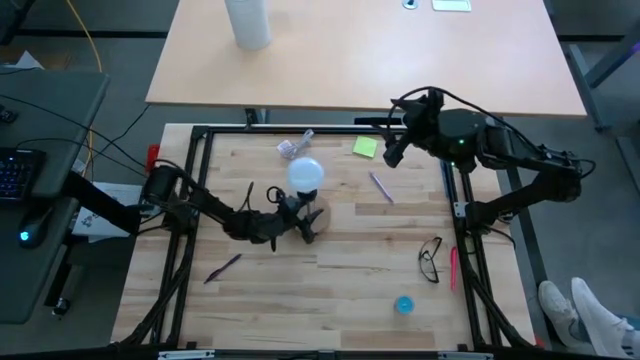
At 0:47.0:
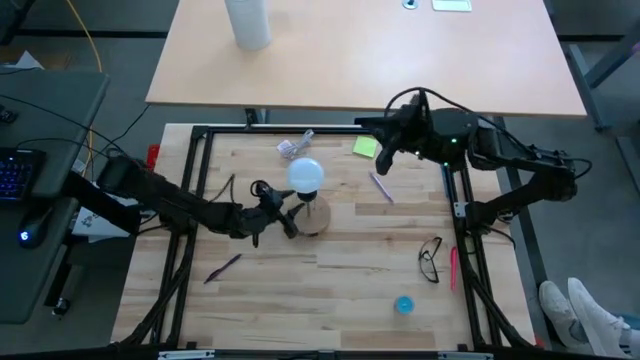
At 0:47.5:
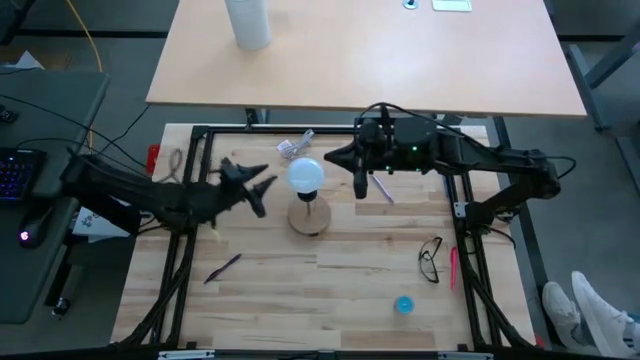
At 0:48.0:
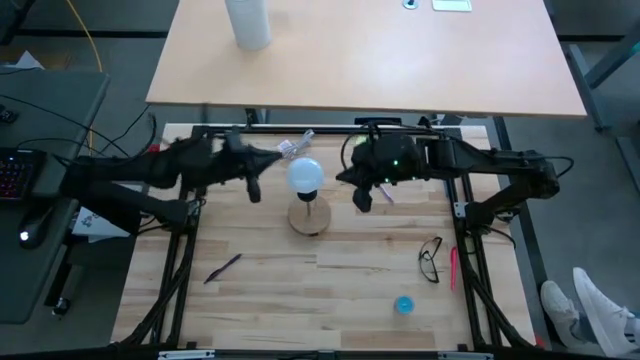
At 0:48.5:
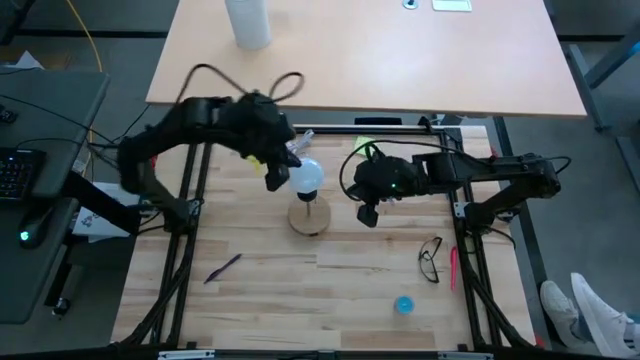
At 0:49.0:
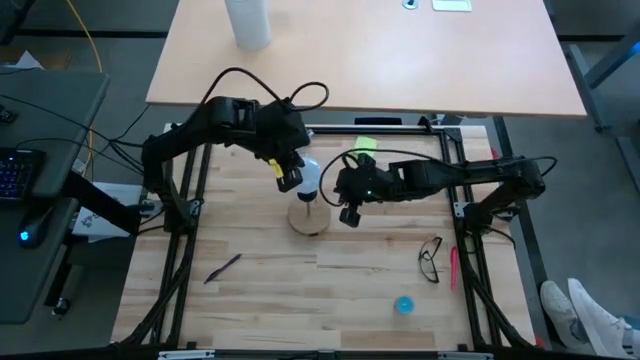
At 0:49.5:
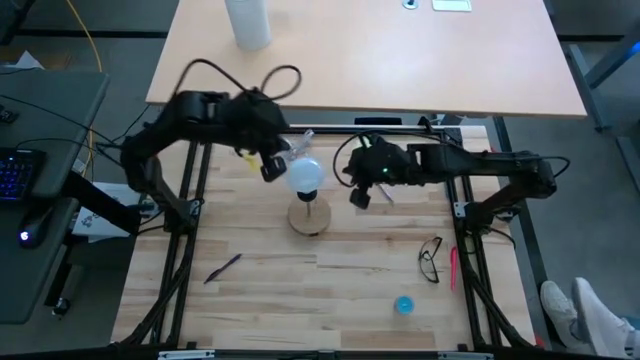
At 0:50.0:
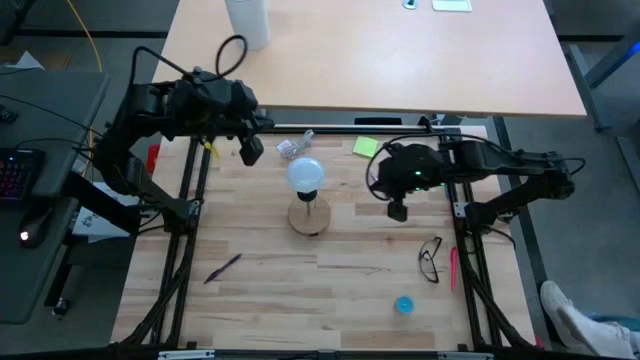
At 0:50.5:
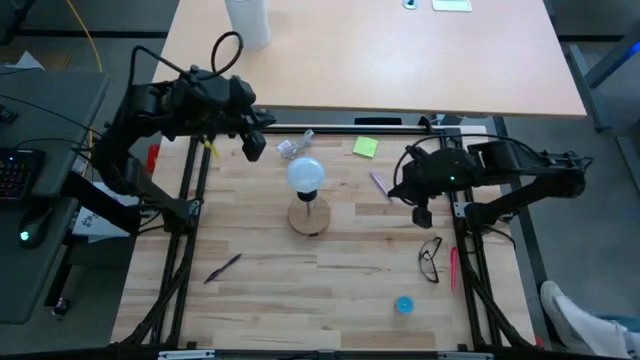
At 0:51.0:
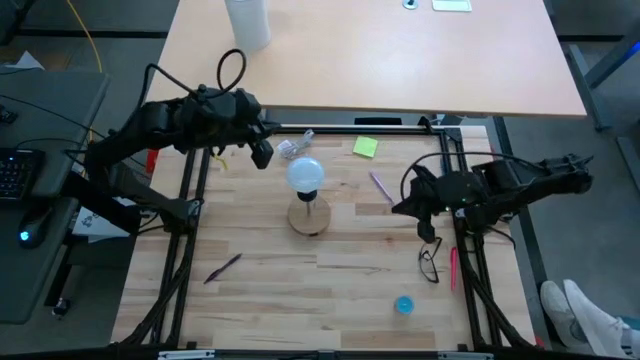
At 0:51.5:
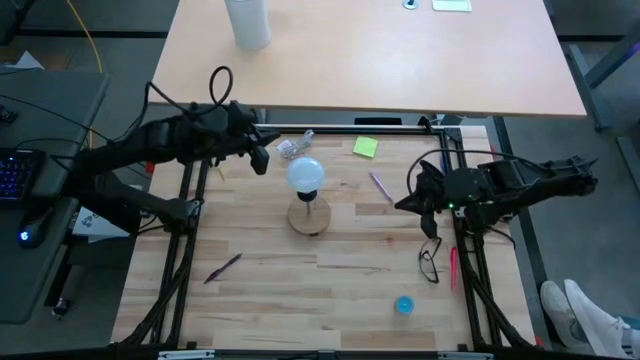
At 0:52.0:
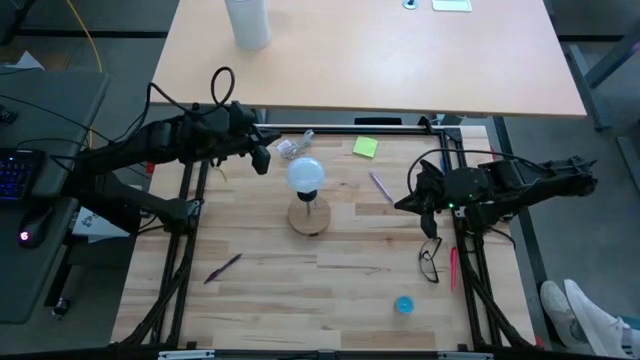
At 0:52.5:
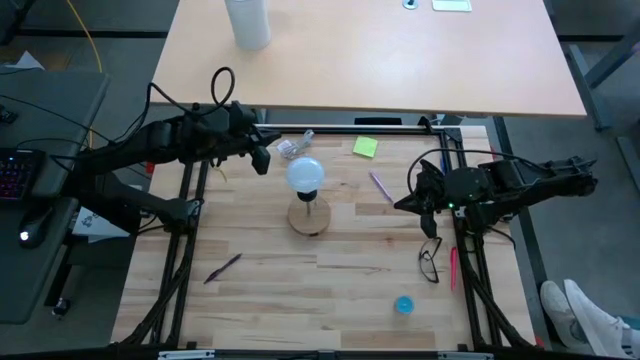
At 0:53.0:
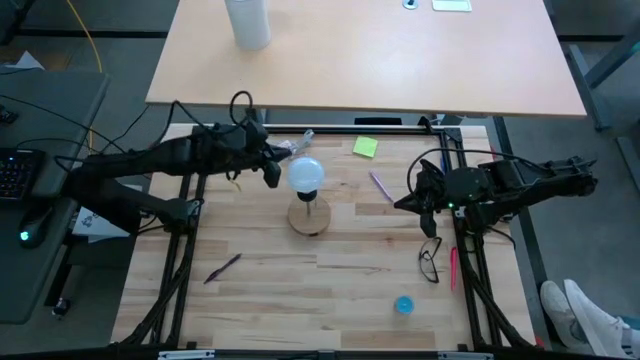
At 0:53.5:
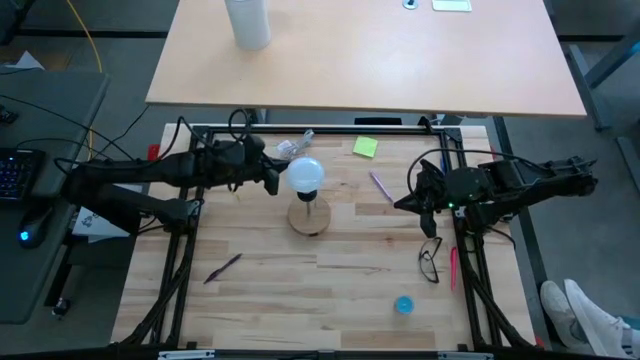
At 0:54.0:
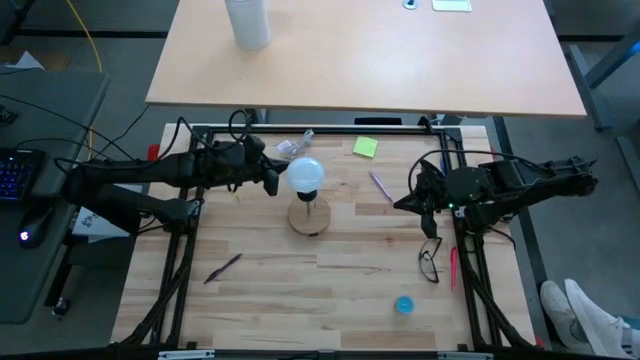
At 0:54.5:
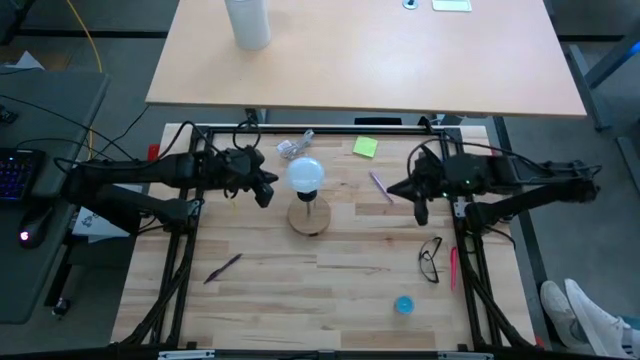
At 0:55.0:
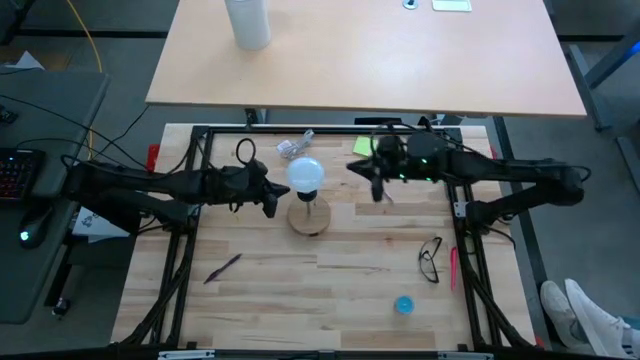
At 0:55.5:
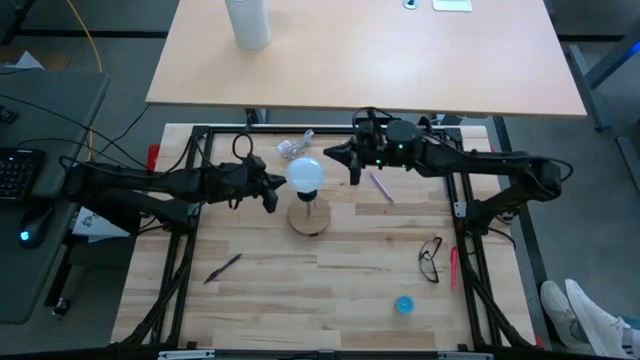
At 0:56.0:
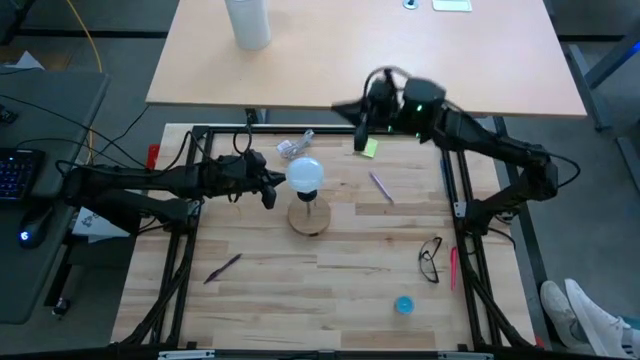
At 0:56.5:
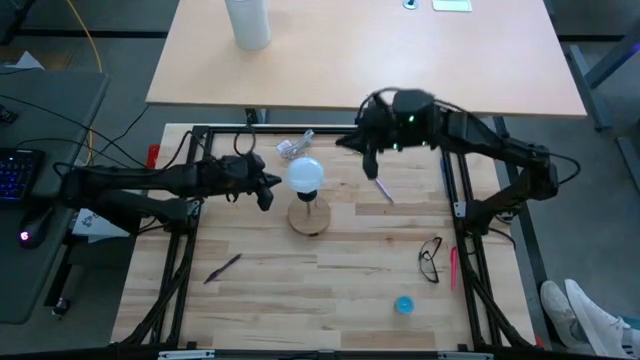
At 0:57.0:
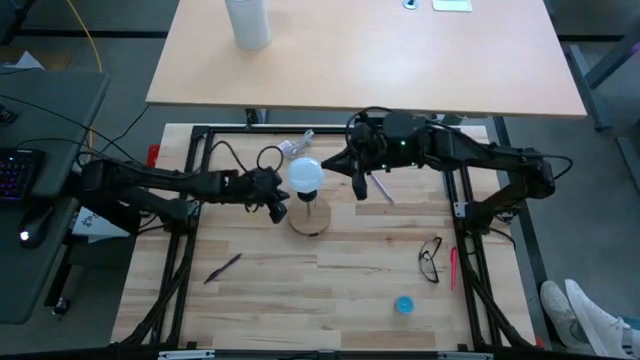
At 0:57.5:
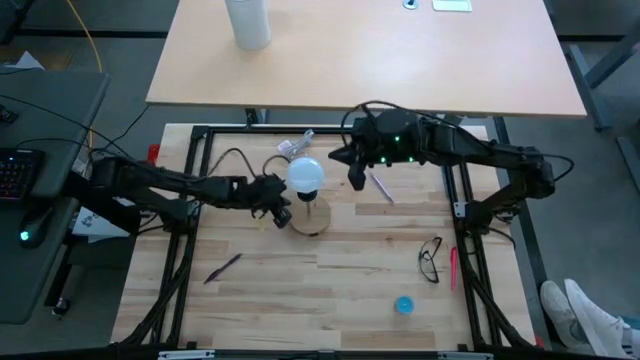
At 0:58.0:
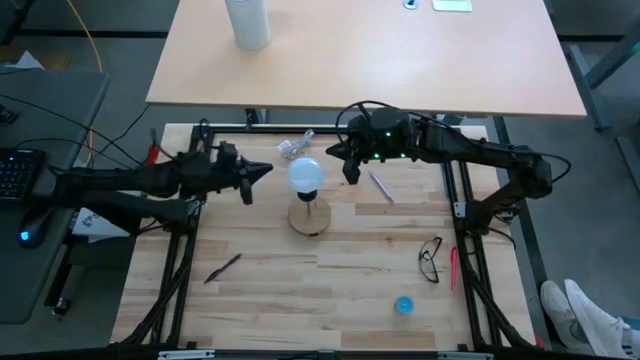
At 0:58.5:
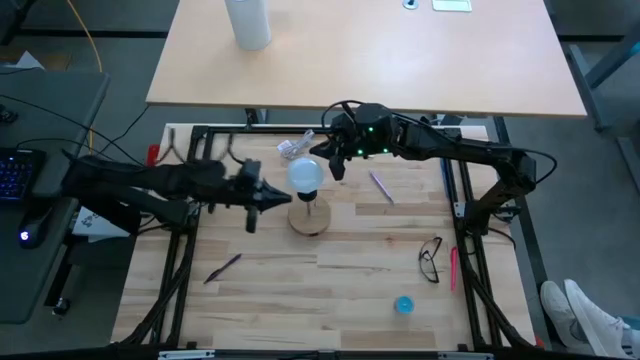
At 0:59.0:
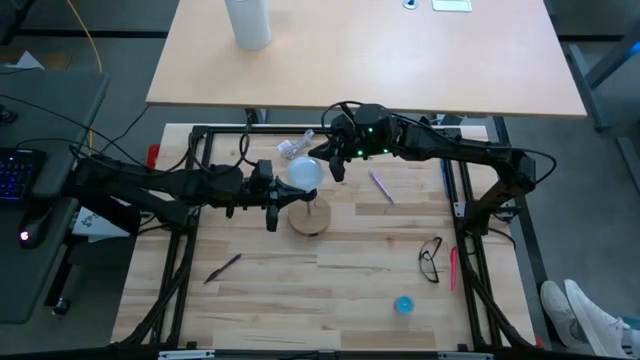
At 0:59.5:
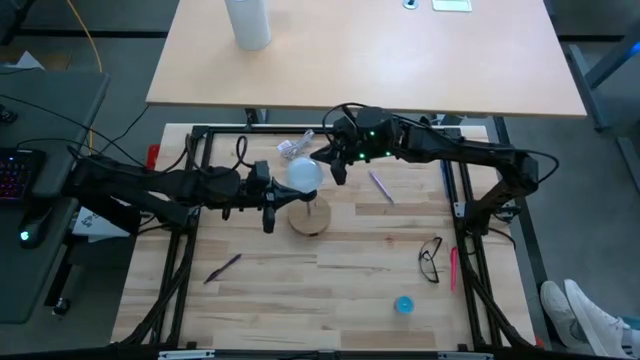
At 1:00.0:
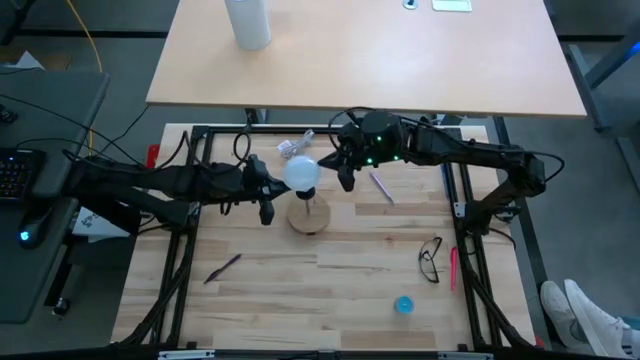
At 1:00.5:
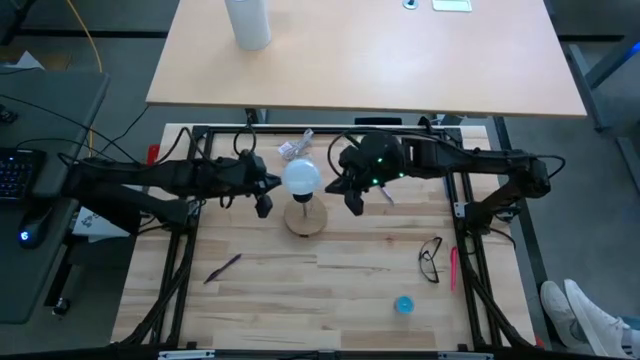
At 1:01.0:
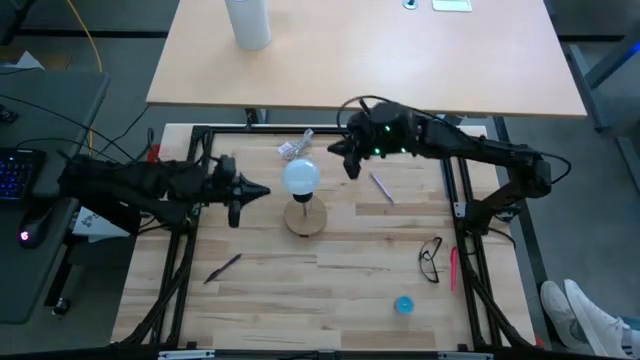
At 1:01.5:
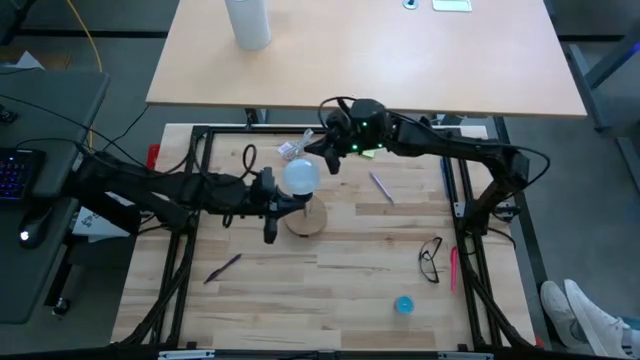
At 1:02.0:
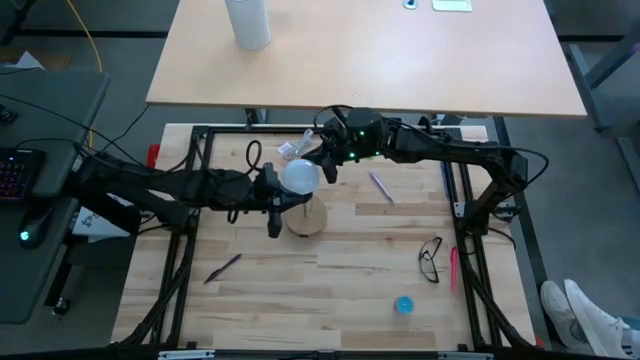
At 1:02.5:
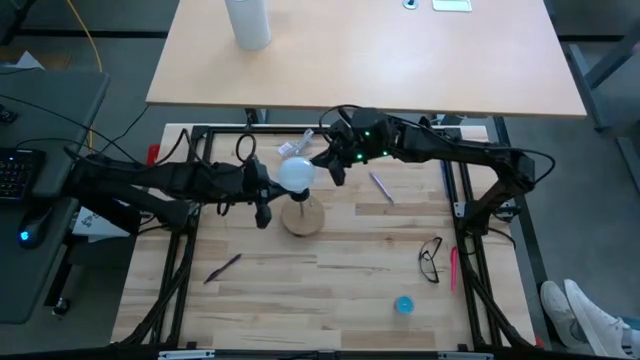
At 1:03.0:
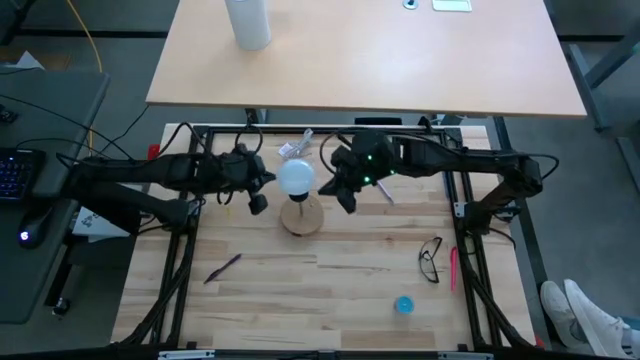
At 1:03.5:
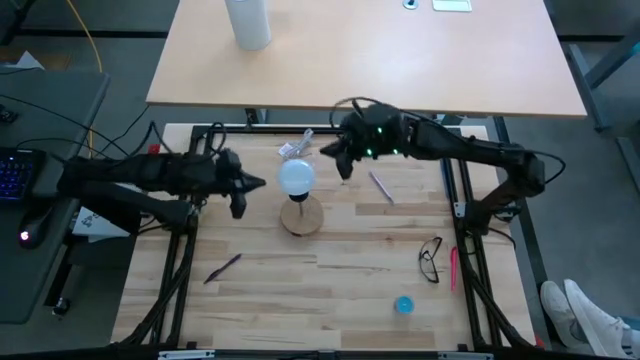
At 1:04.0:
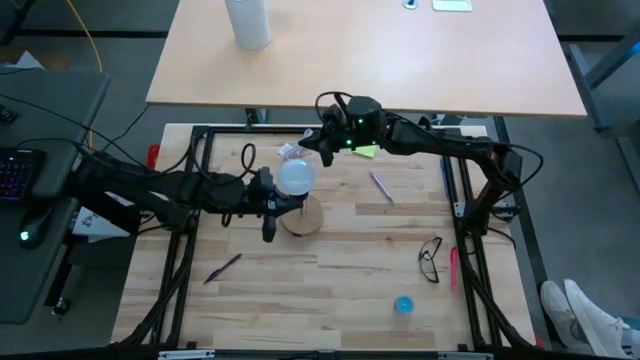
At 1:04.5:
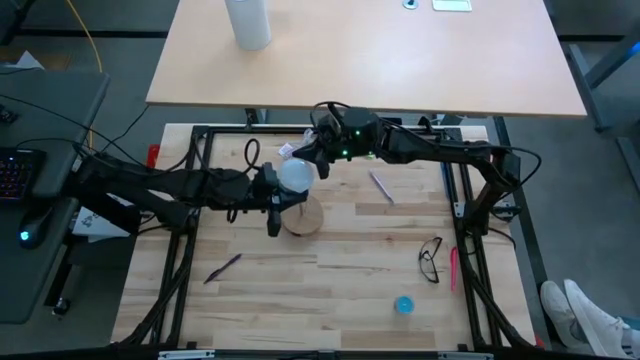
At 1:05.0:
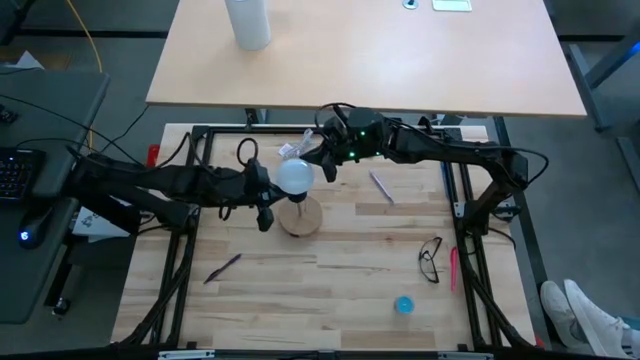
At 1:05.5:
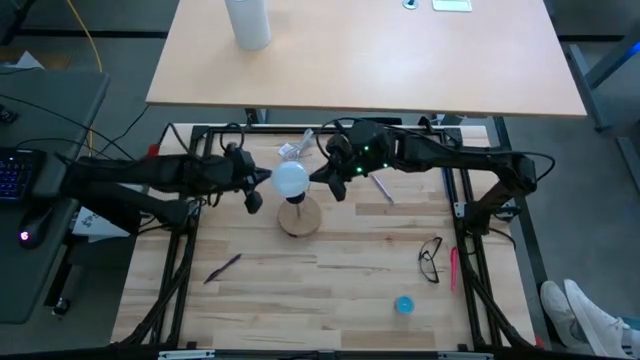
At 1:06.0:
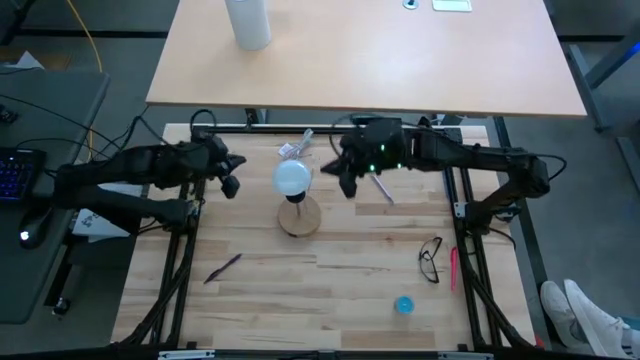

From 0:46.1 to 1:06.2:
Task: Screw lightbulb
Insert the light bulb into the lamp
